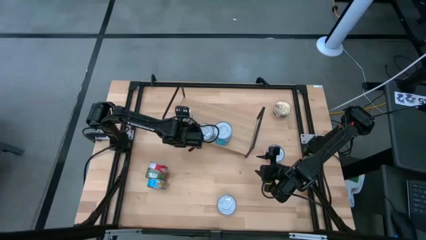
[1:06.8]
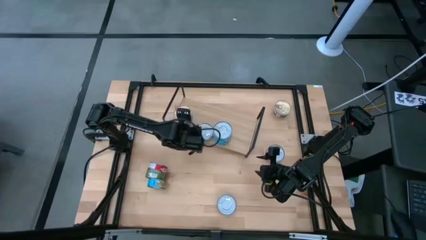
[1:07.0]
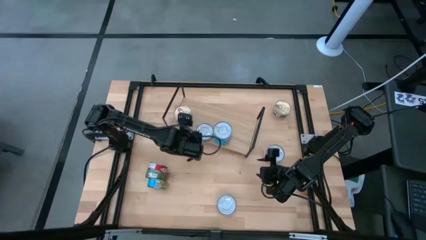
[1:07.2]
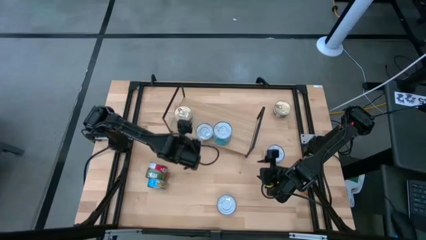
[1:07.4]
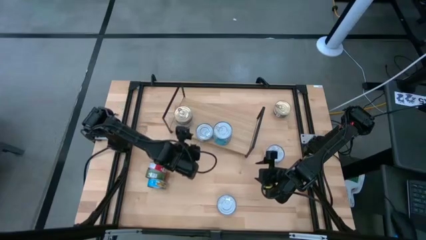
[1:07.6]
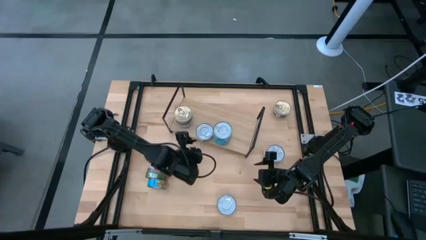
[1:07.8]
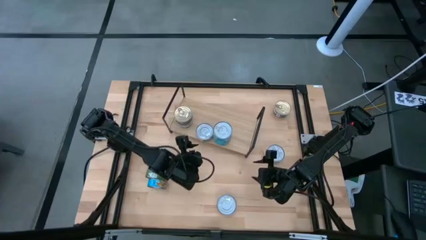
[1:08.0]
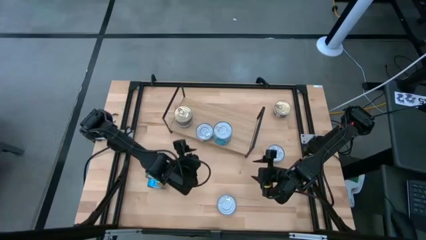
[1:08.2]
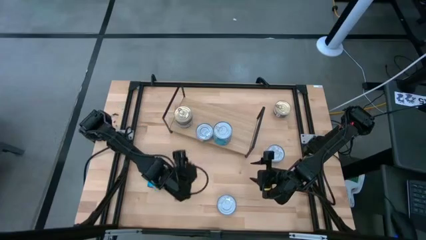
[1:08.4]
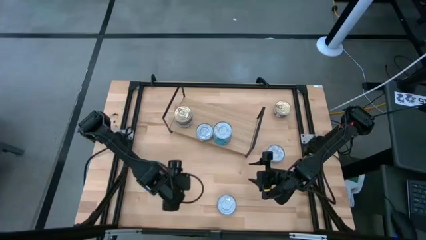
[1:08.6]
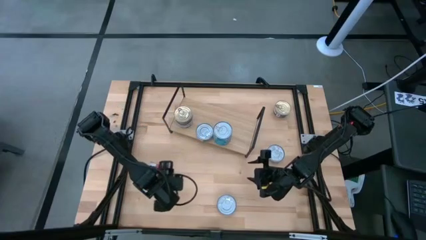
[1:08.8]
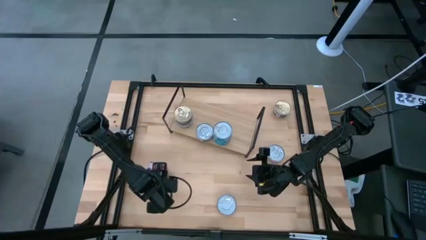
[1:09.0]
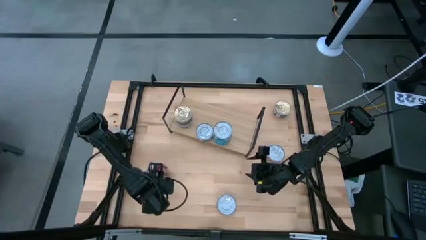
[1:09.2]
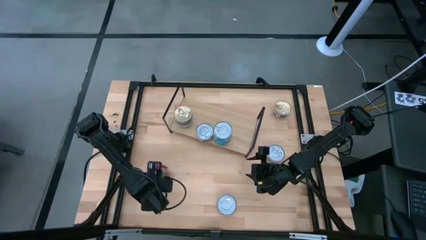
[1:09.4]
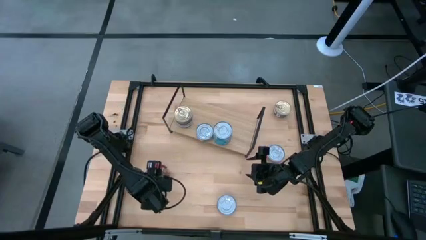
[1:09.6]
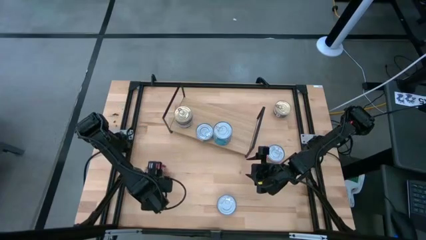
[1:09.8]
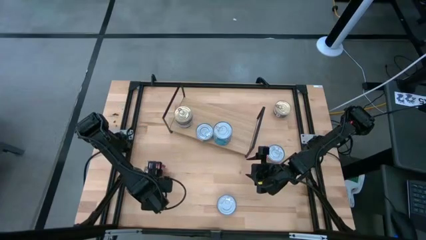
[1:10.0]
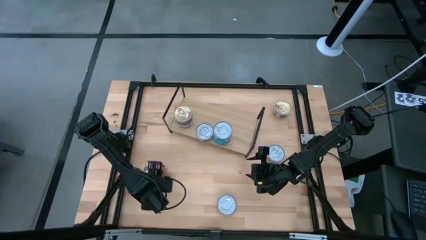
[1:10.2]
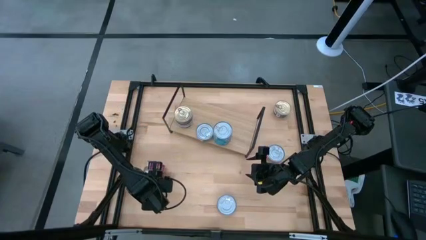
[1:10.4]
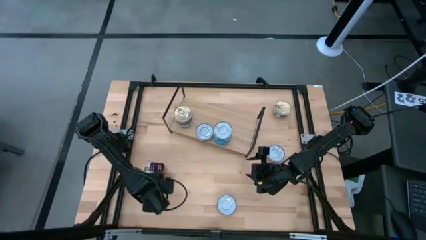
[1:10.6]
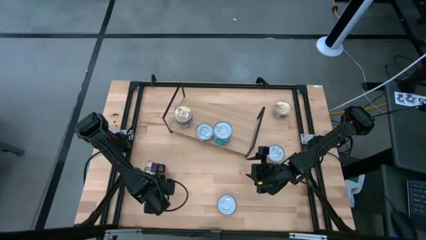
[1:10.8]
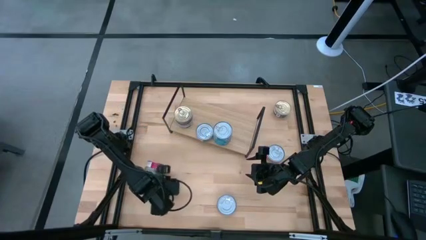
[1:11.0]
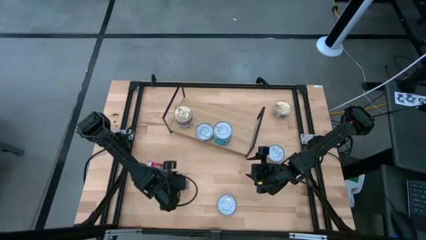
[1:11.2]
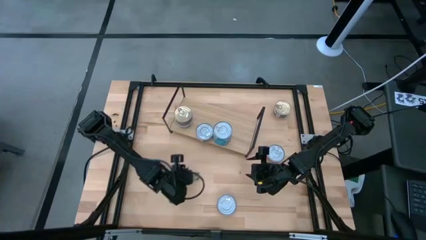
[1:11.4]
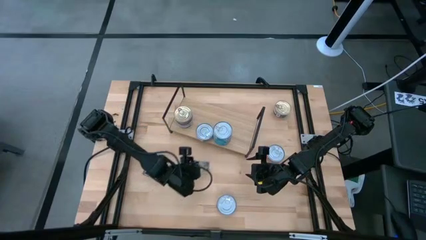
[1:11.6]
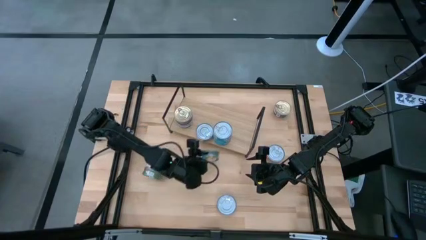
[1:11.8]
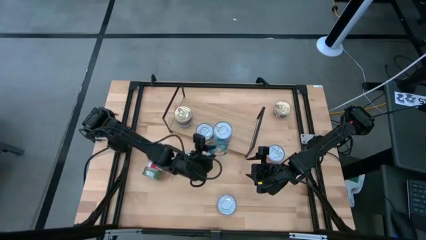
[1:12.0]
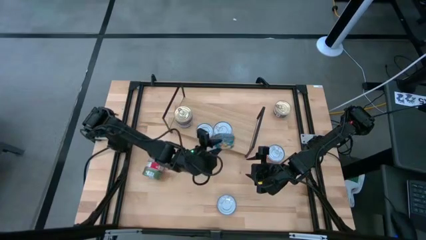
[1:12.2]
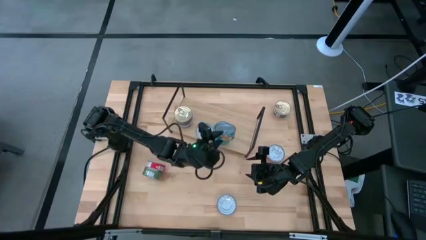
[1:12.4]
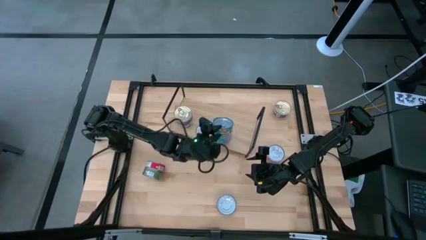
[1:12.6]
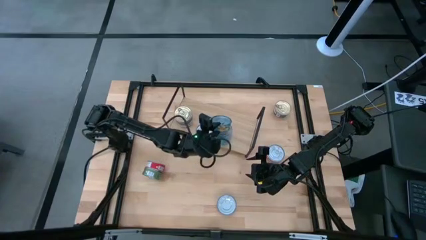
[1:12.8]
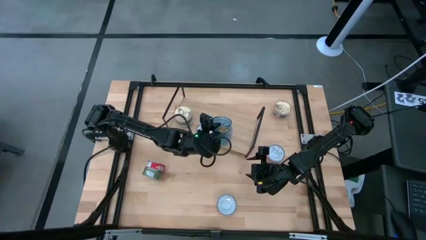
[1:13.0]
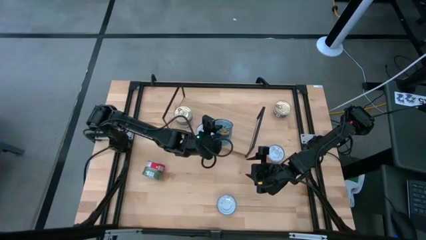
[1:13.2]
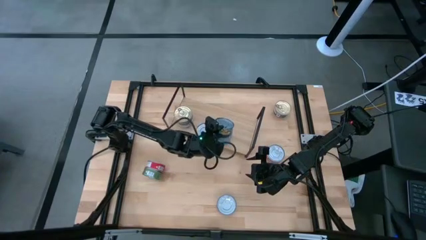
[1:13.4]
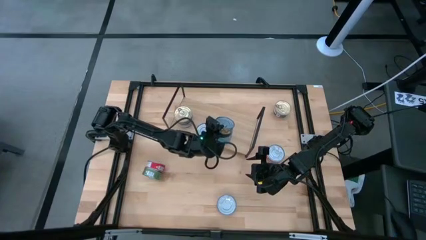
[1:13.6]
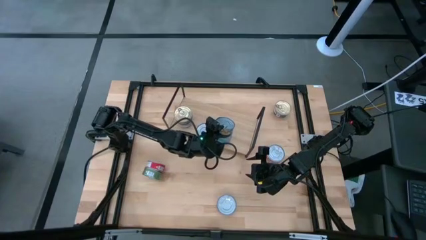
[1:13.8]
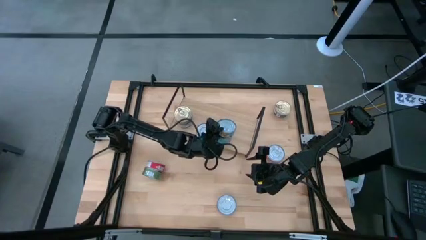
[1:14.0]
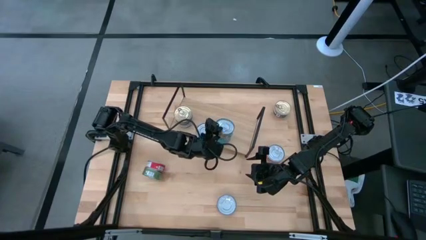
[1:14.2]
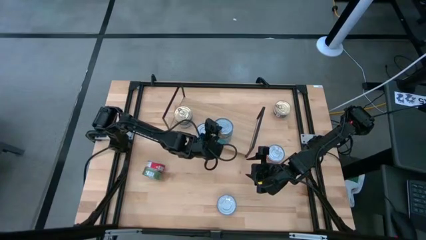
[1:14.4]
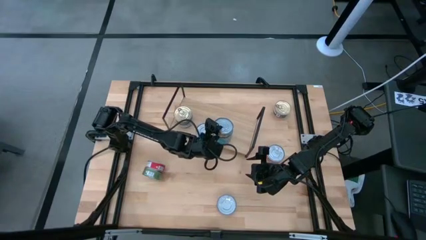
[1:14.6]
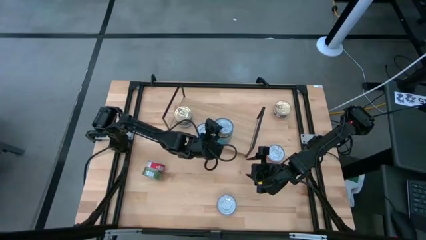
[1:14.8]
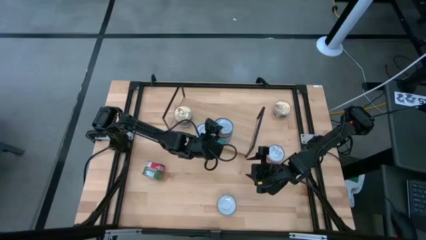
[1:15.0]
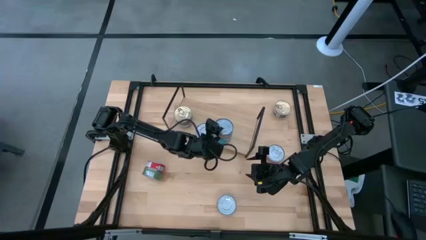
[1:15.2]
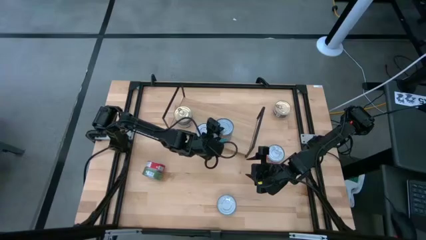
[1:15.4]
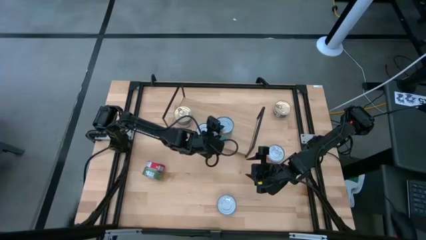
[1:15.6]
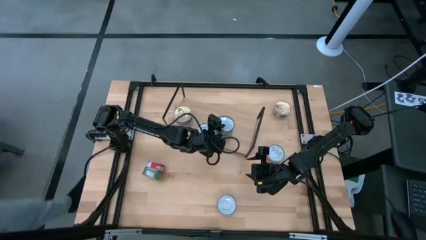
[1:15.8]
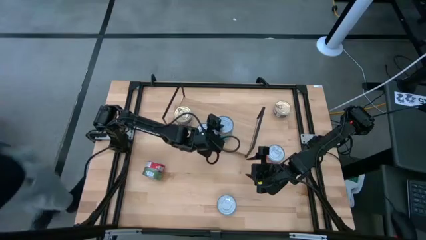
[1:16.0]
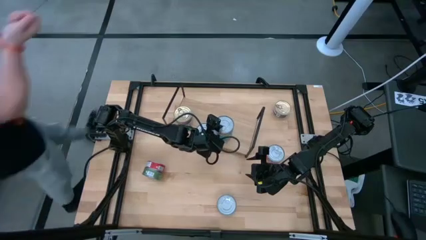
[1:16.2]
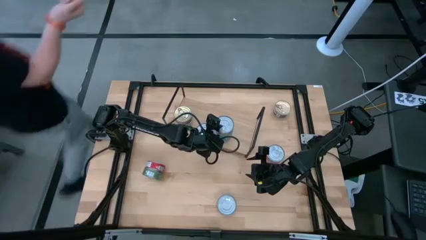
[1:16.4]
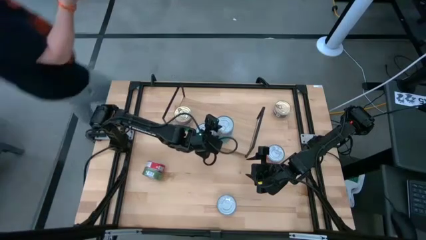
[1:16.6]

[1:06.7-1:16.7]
Task: Stack canned seafood by type on shelf
Stack the yellow-blue tuna can on top of the yellow-blue tuna cans on the shelf

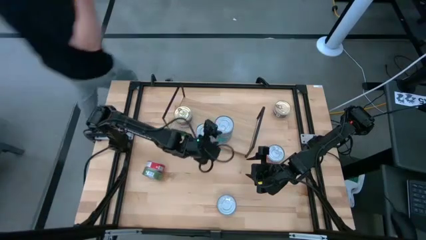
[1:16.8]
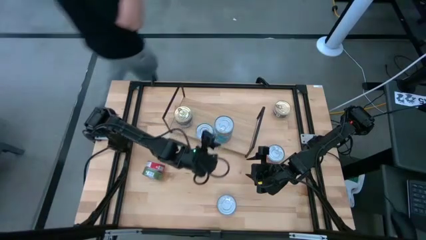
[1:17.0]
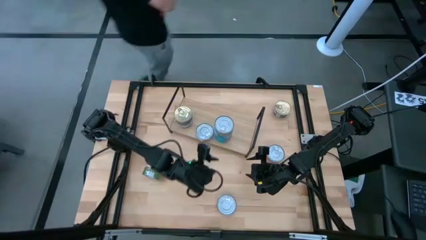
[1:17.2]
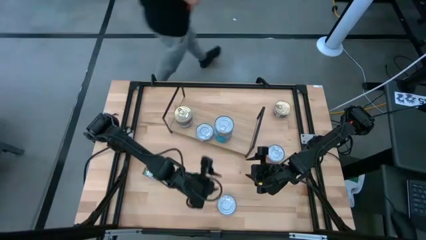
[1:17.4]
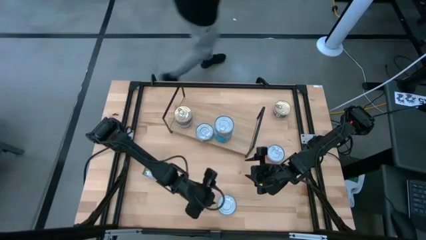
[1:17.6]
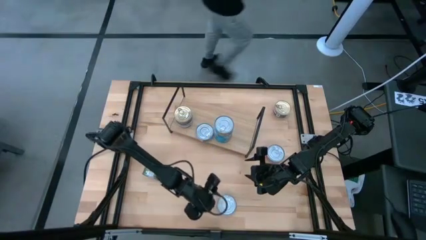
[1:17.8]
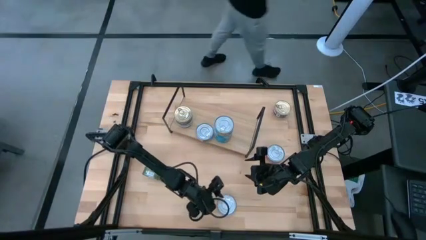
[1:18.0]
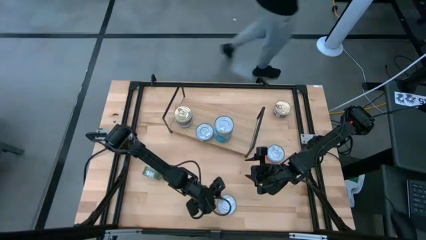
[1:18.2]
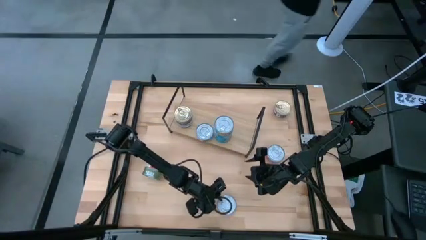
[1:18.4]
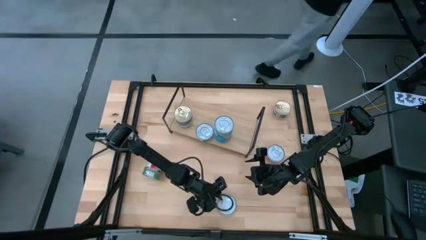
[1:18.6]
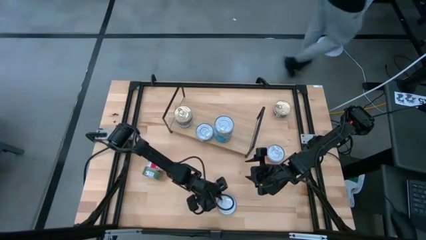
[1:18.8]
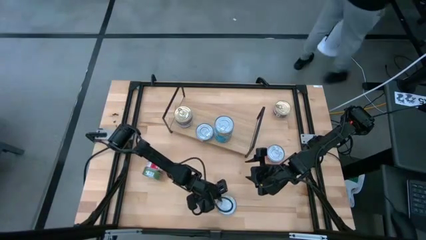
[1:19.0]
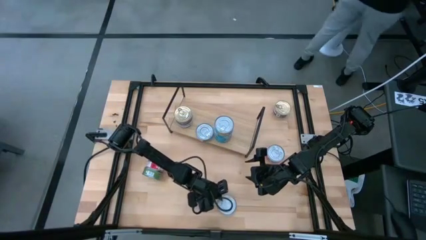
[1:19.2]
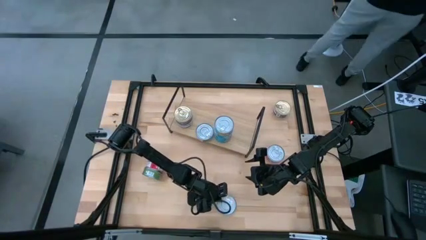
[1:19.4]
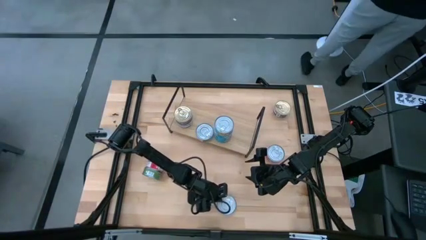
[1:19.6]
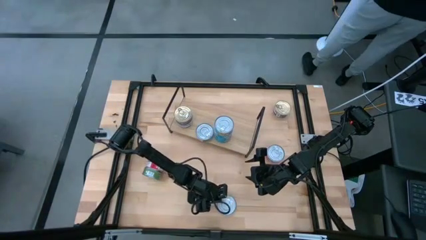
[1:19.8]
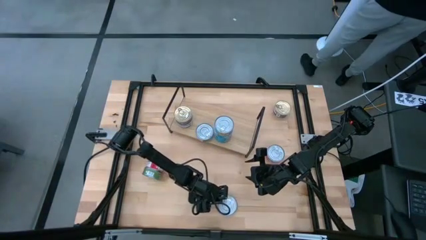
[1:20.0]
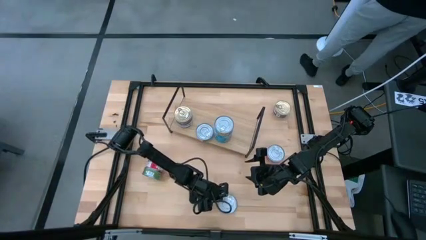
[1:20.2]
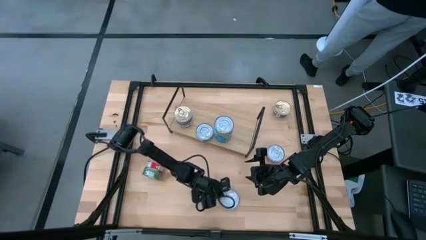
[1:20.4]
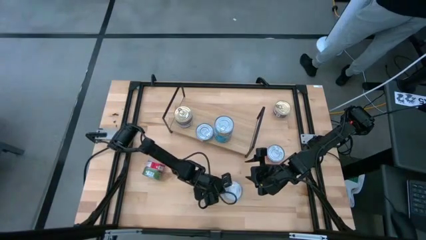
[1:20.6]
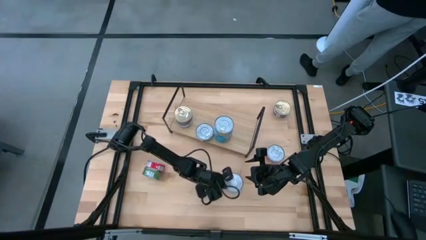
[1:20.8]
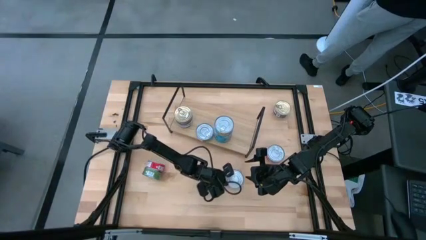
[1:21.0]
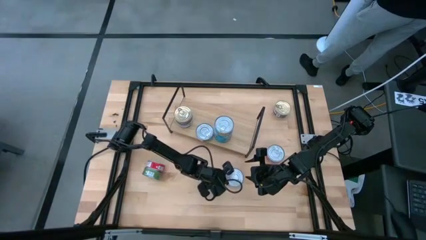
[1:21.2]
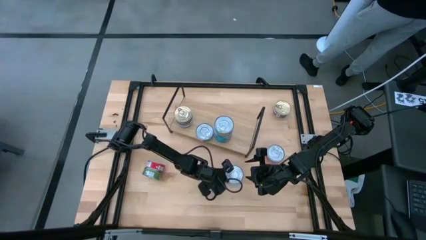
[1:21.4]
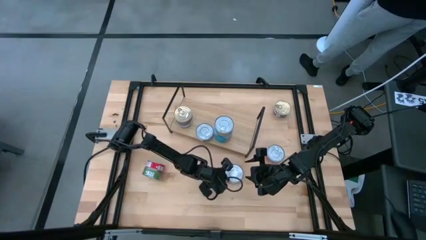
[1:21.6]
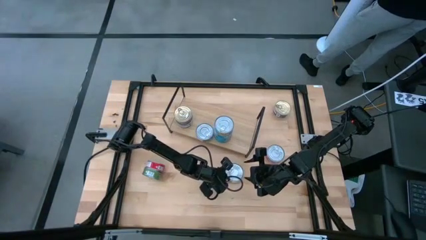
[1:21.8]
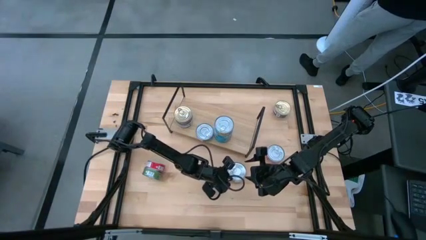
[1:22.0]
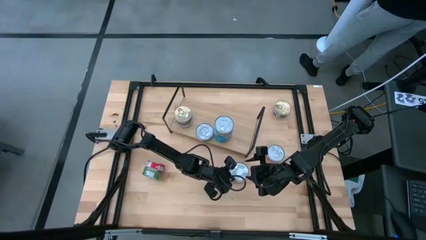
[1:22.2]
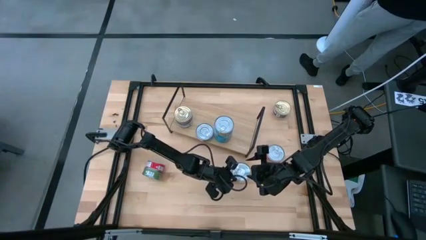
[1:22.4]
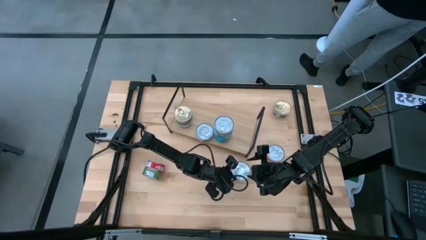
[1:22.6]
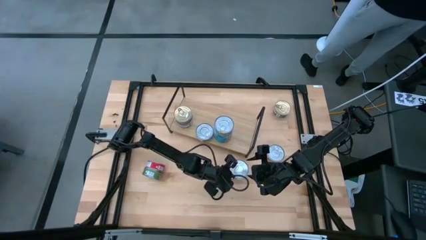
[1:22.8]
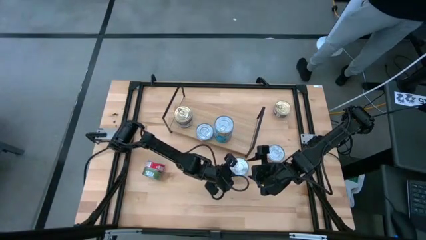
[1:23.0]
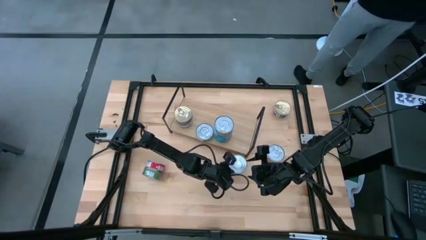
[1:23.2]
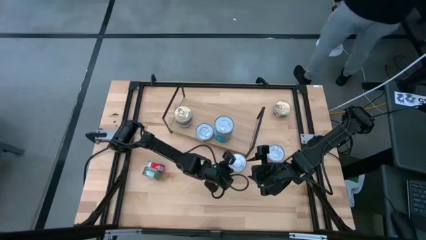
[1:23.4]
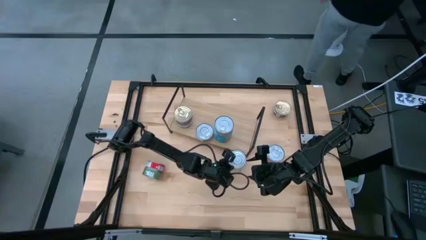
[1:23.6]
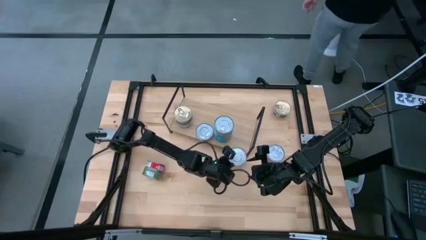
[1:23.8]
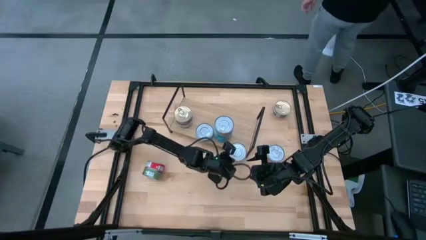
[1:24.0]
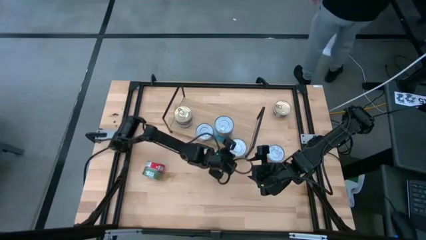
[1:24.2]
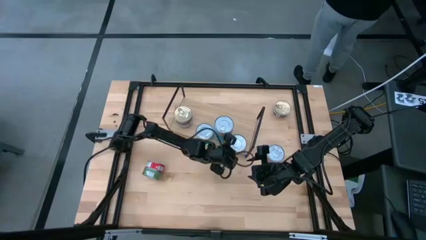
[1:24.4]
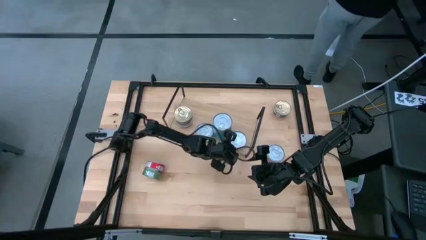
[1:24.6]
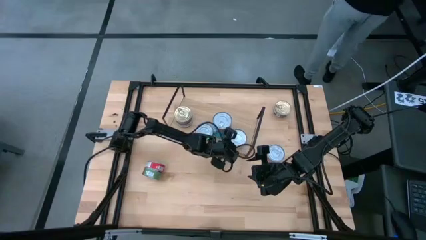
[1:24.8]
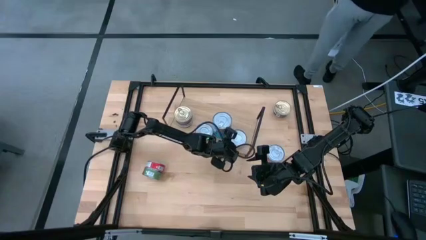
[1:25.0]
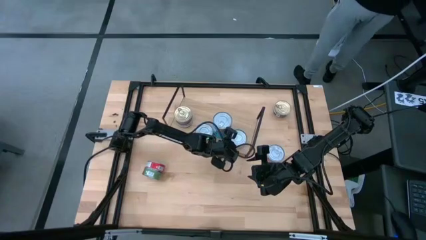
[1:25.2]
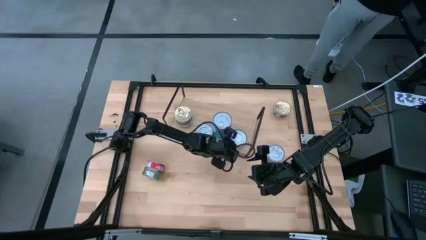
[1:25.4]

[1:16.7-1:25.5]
Put the red tuna can on the shelf
